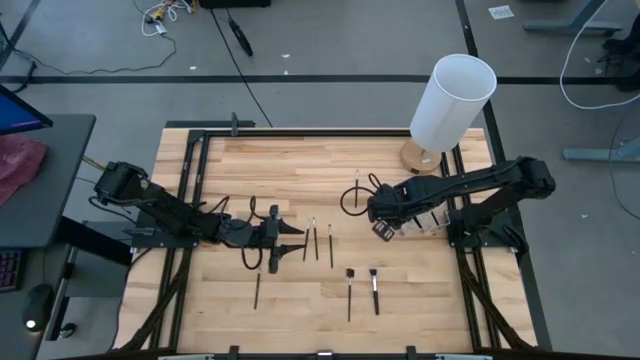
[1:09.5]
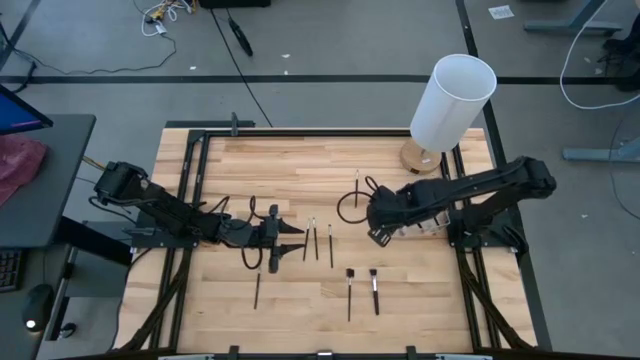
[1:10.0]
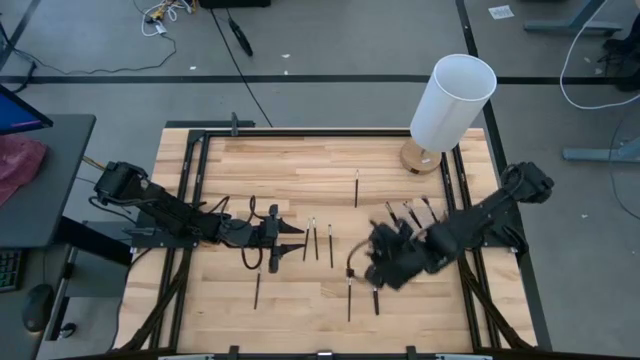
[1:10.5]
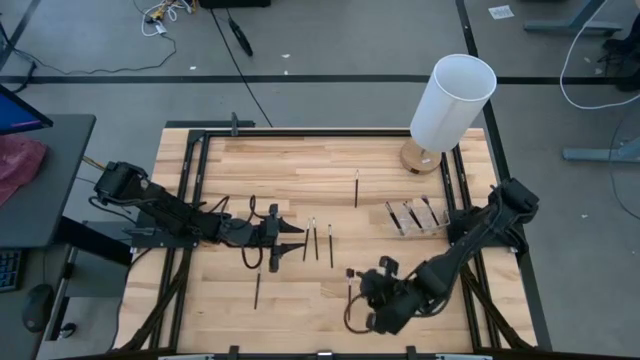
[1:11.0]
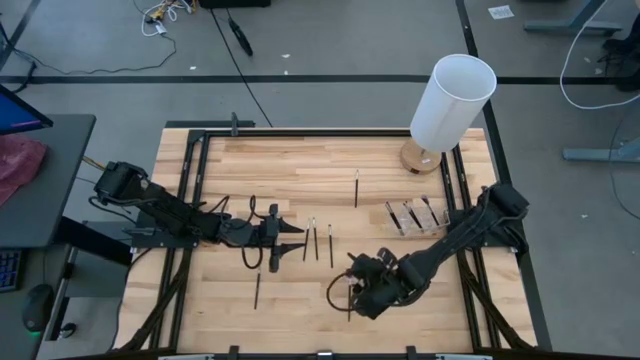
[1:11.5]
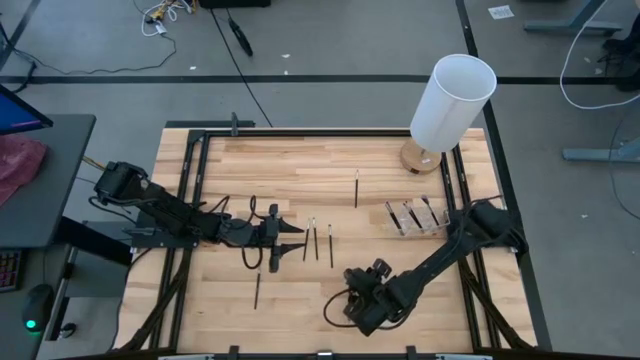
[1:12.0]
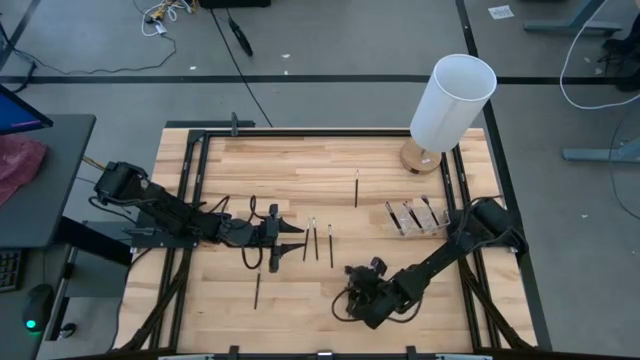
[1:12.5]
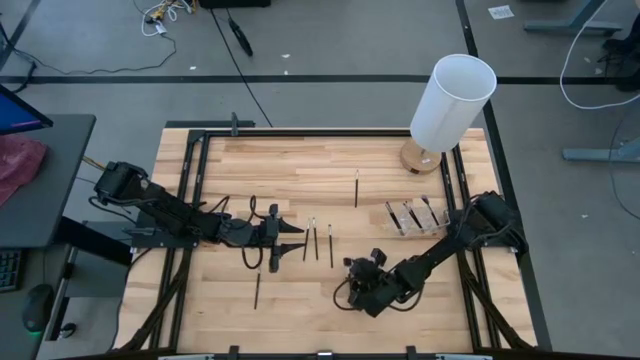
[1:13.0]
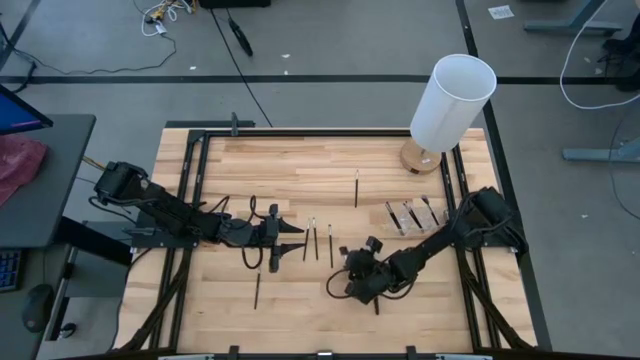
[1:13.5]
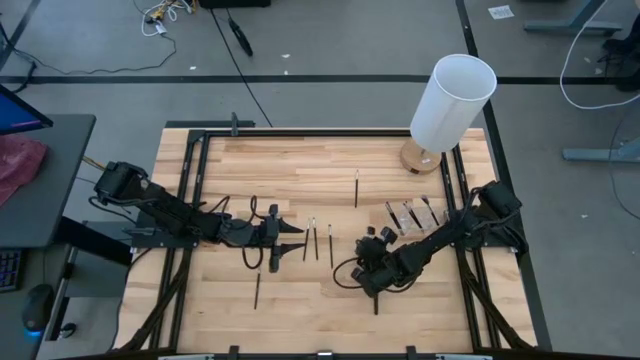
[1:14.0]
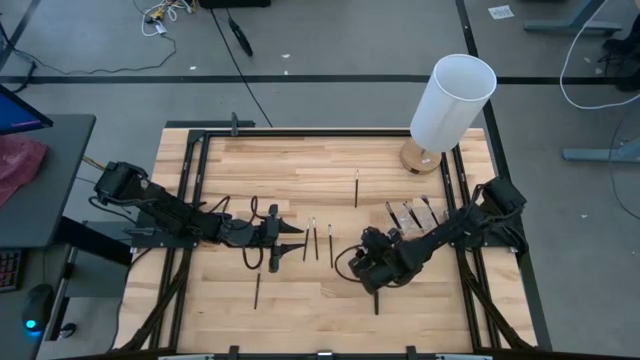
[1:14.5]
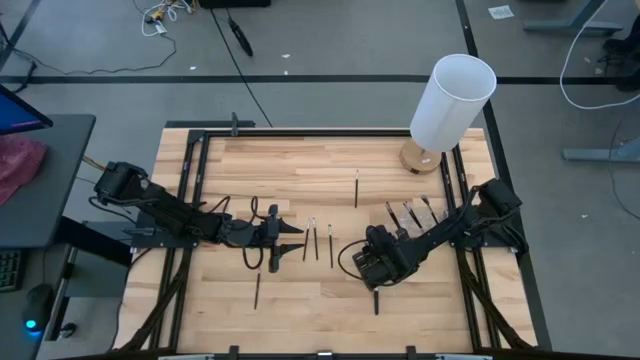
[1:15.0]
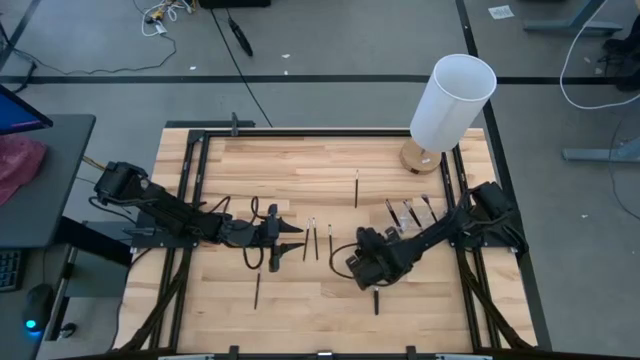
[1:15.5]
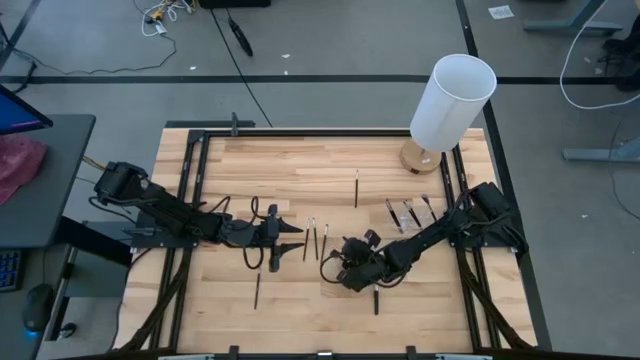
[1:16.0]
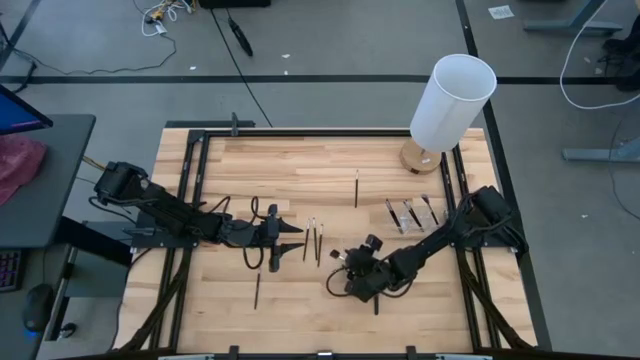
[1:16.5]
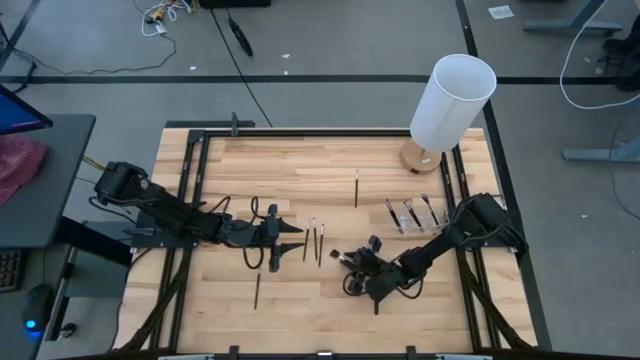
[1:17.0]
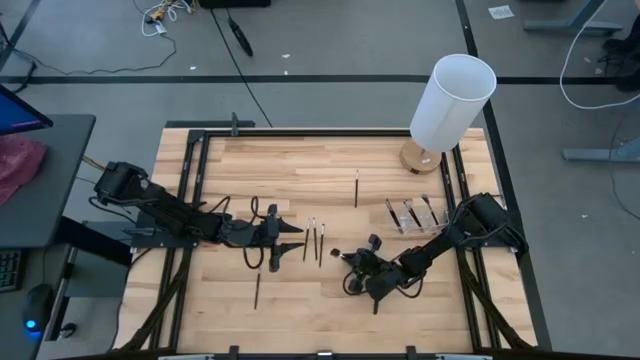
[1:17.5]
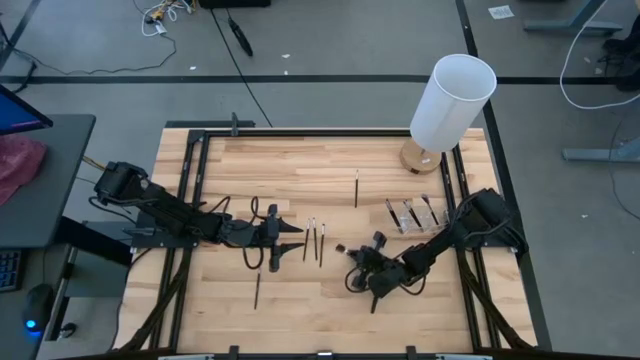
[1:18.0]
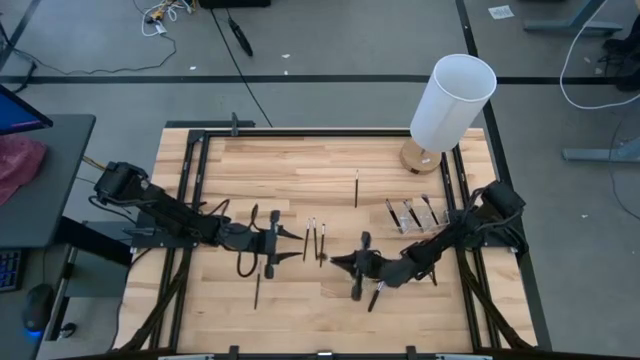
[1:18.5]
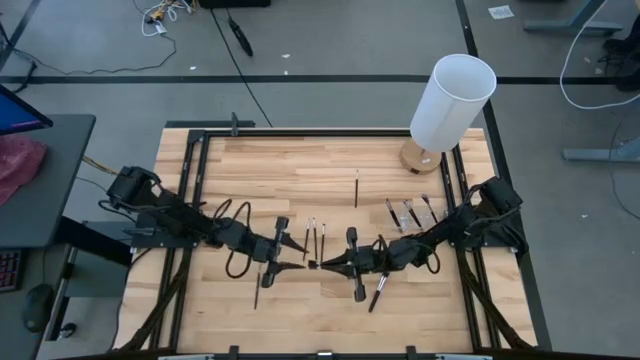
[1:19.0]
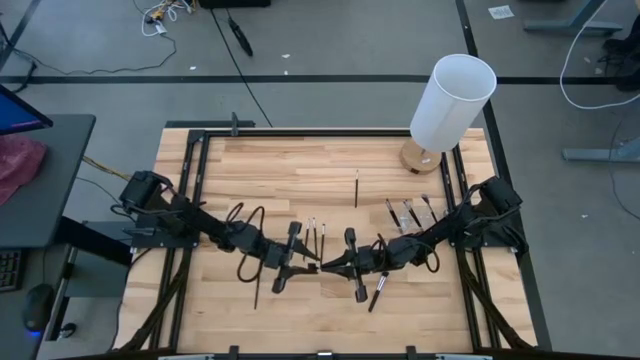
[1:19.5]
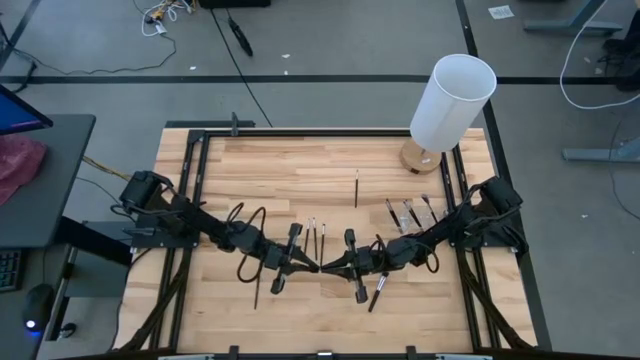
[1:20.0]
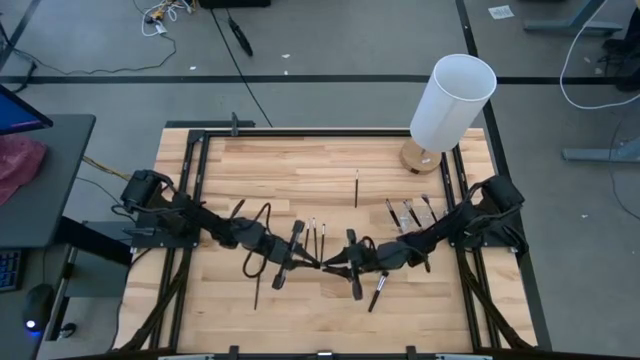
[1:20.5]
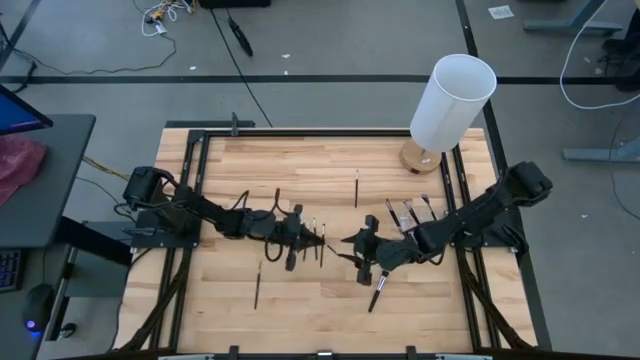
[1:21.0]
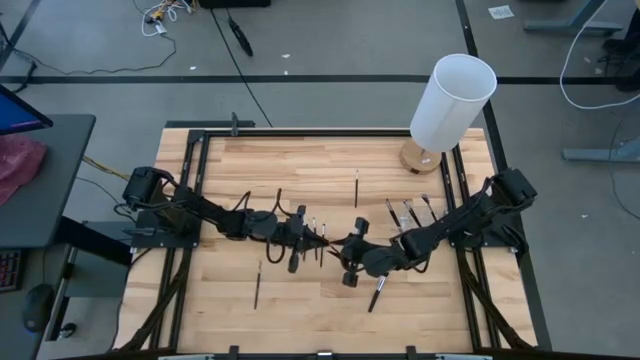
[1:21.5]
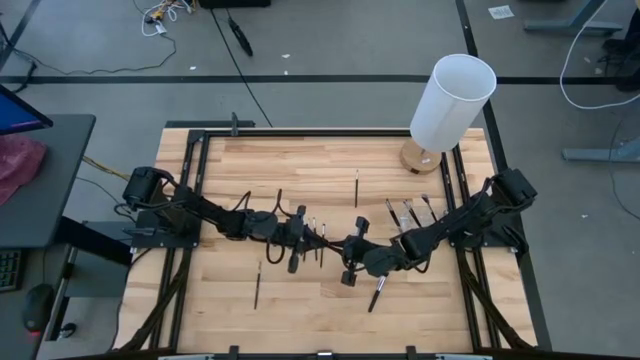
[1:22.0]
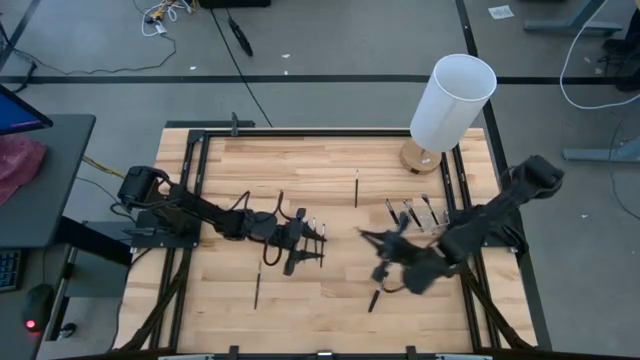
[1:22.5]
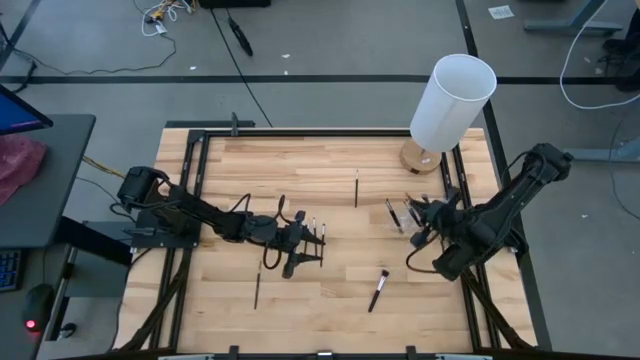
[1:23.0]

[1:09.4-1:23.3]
Task: Put items in baskets/containers
Put the black brow brush into the transparent bin
